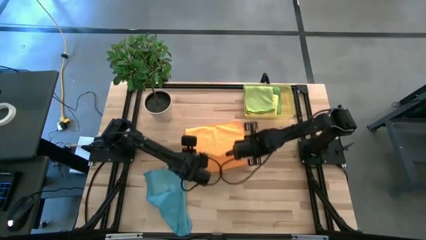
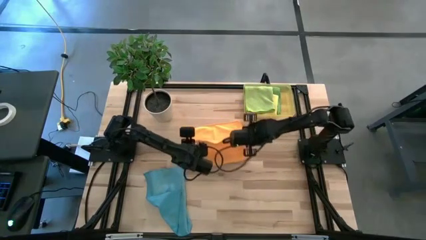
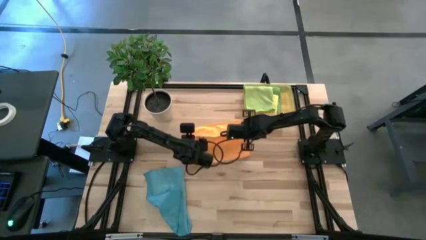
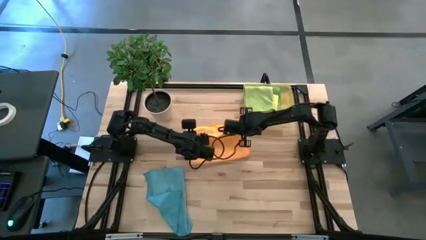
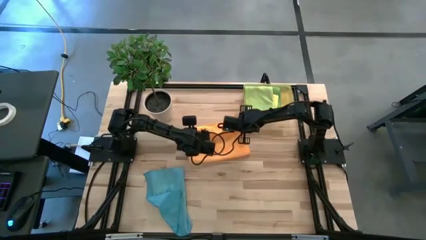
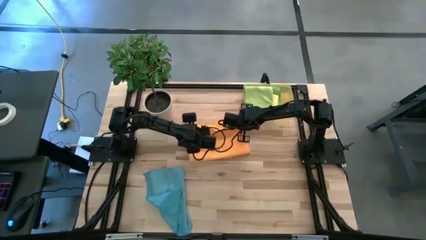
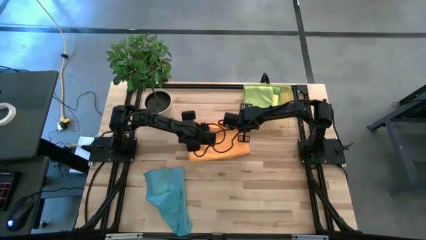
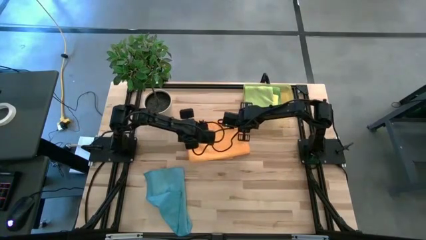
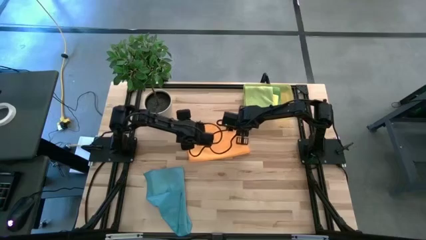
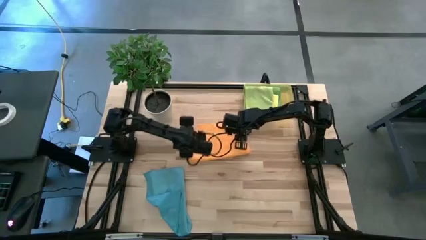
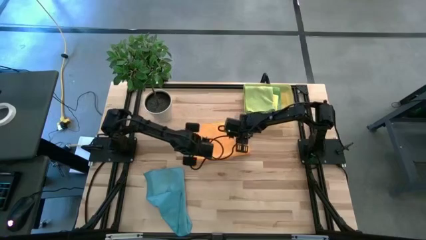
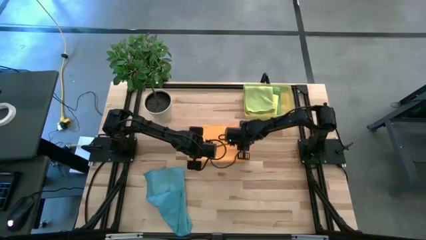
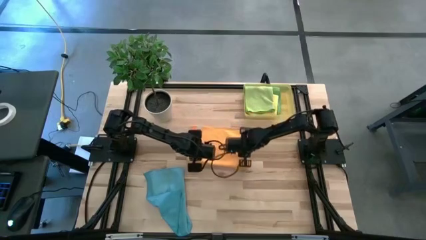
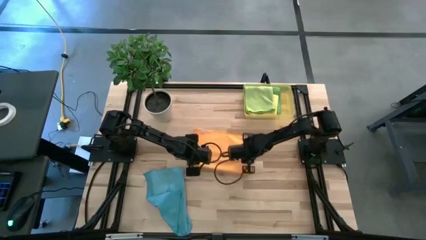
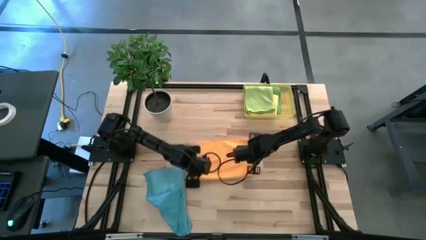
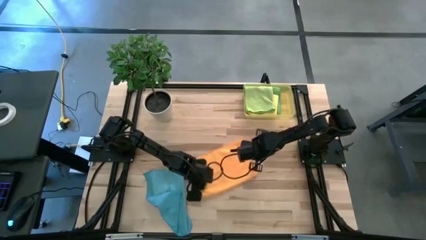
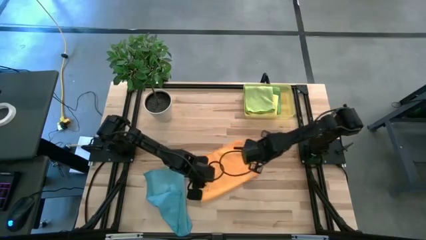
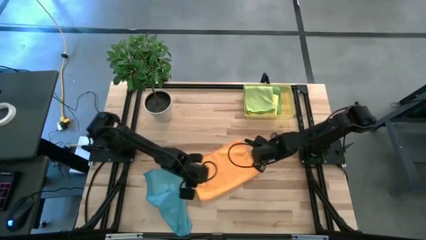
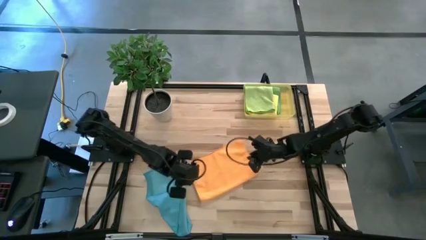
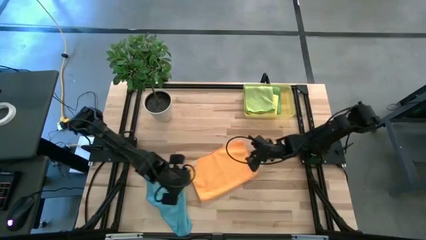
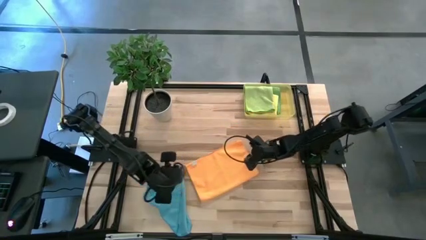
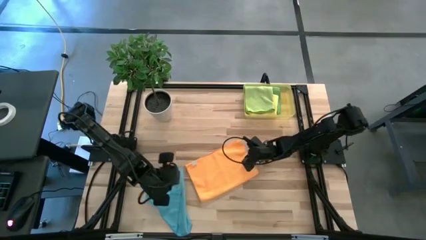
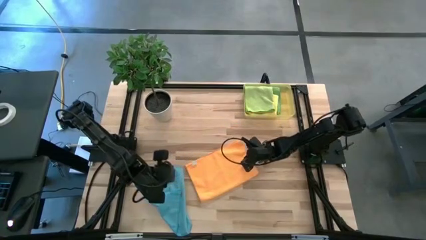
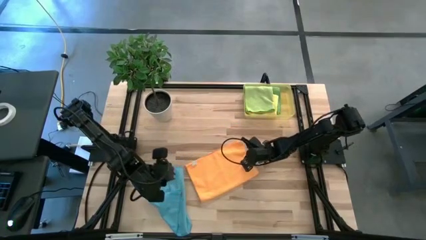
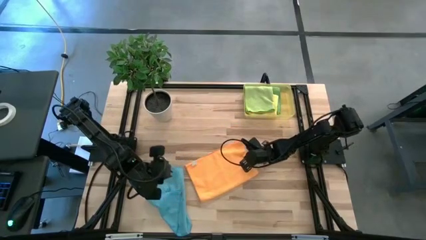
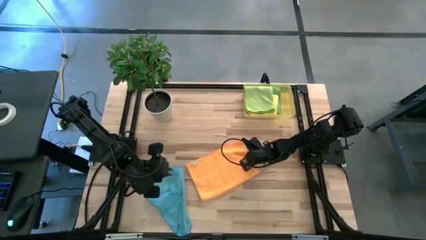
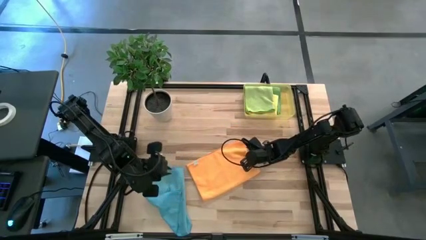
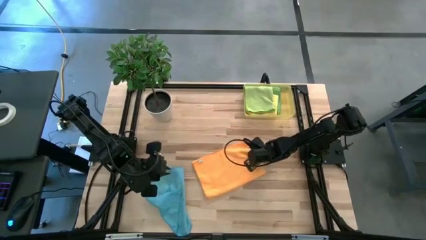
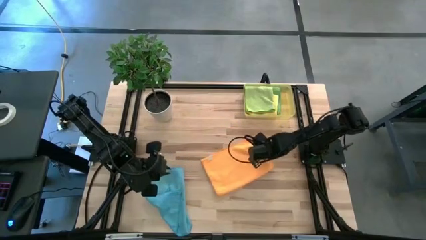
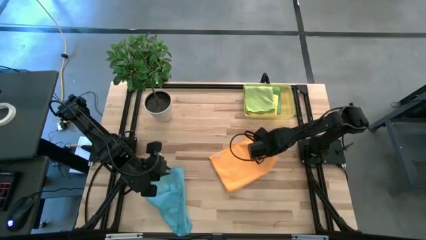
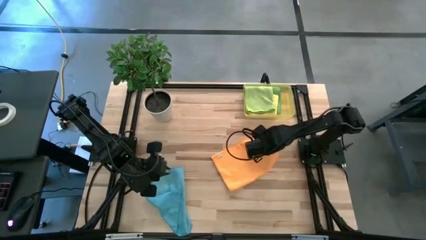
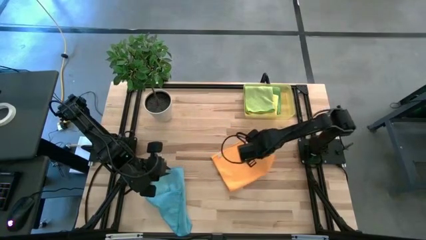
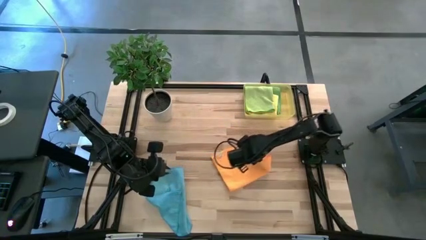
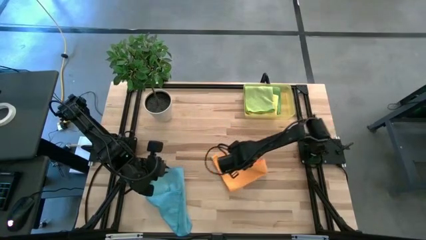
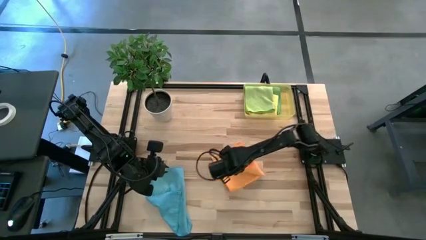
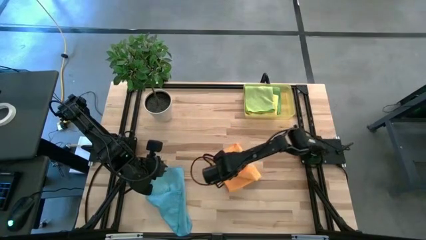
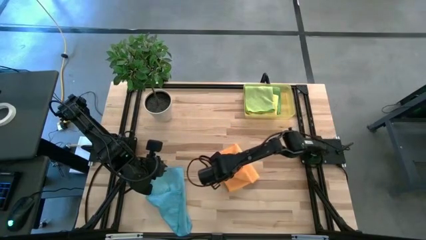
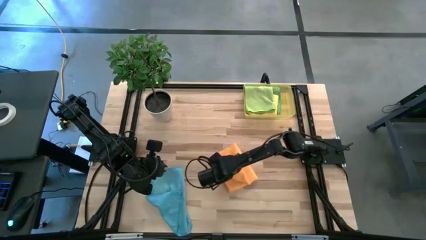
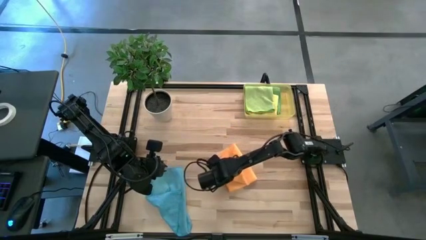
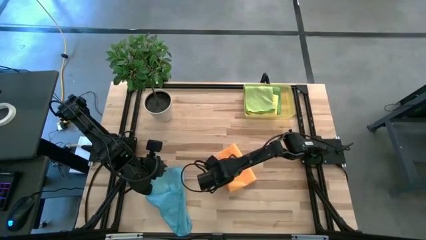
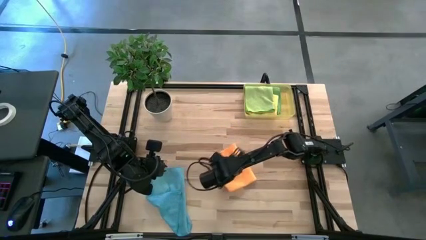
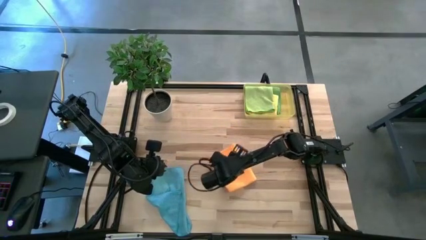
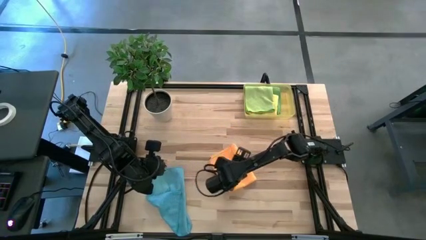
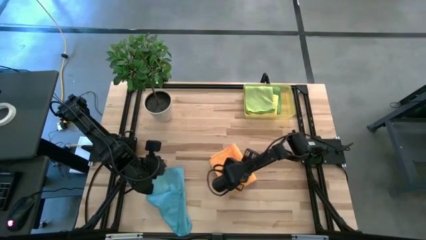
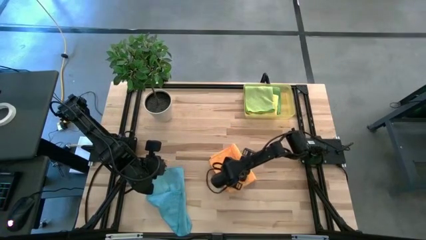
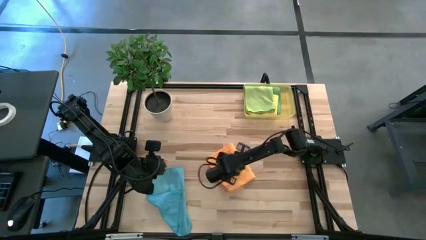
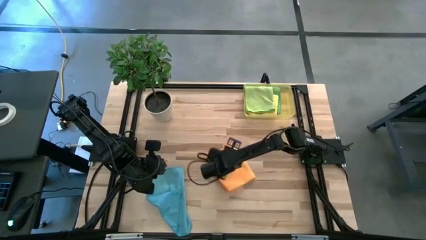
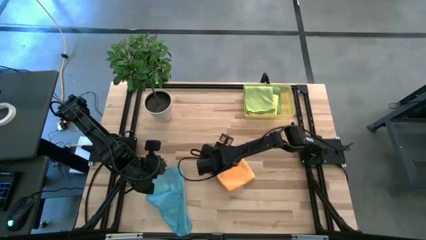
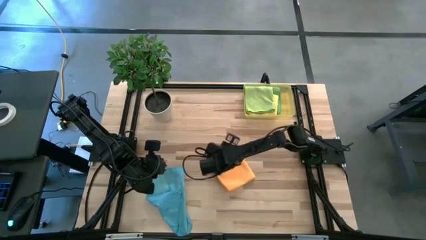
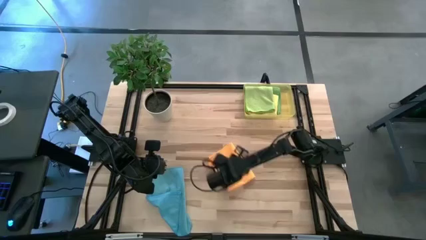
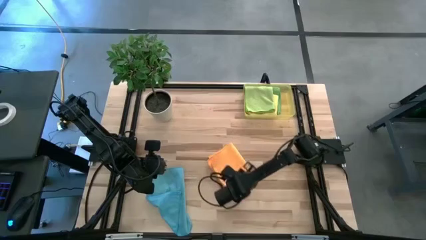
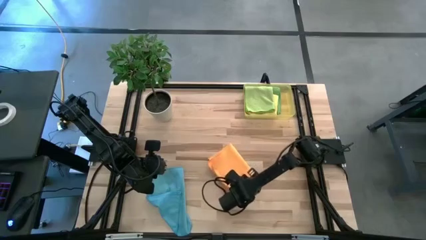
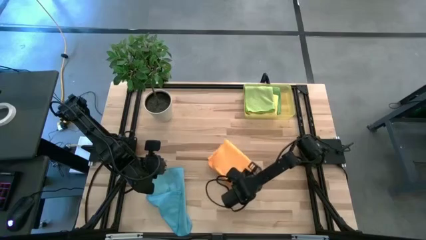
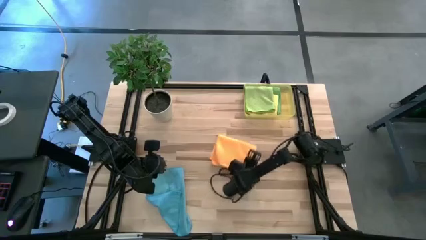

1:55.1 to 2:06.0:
Task: Fold microfiber towels
Fold the orange microfiber towel

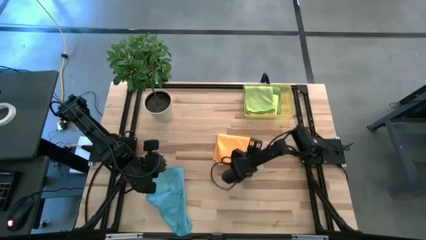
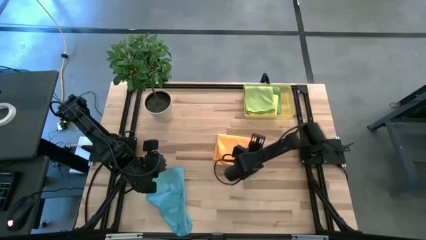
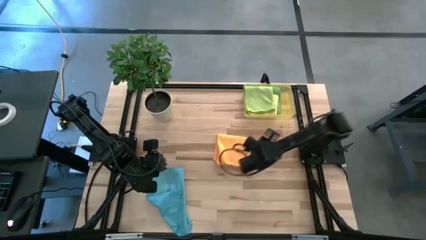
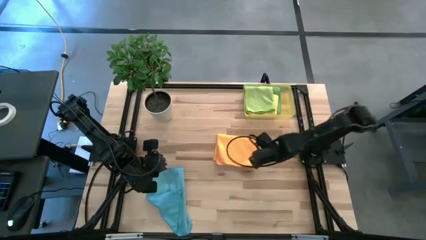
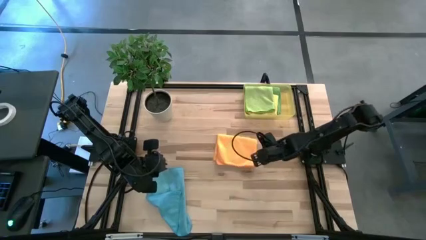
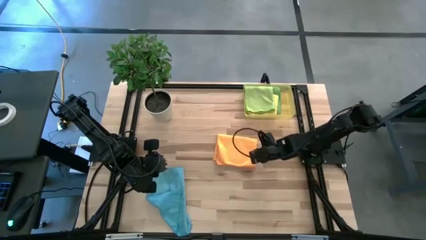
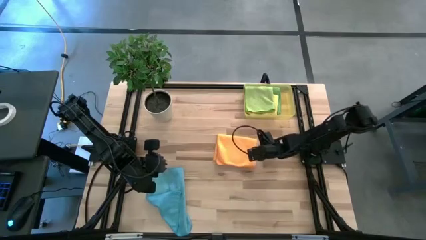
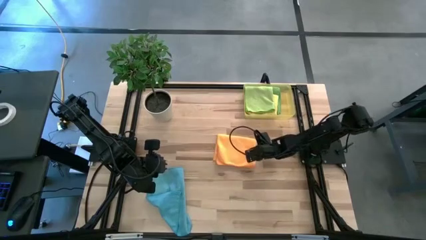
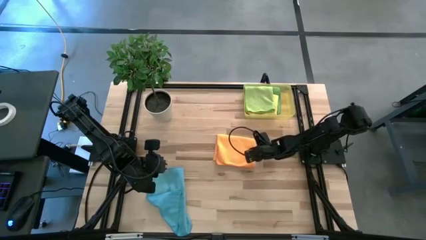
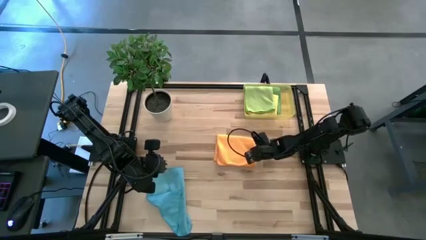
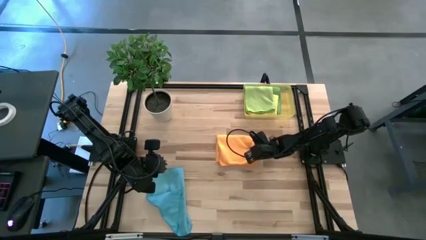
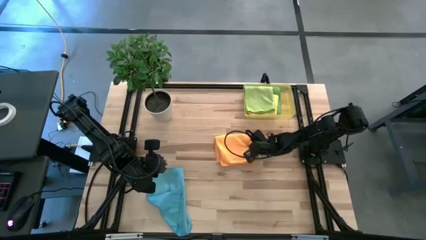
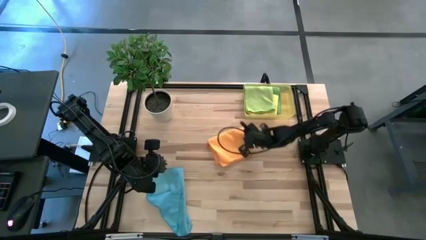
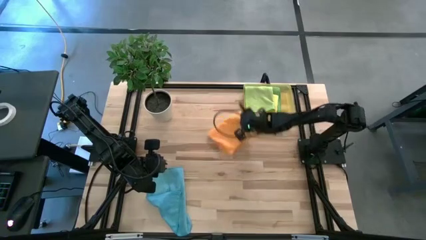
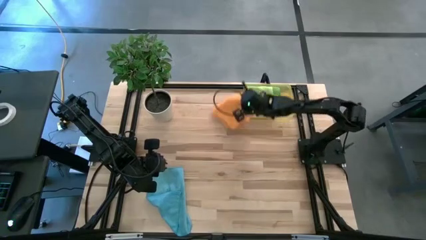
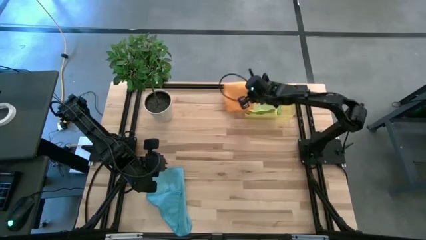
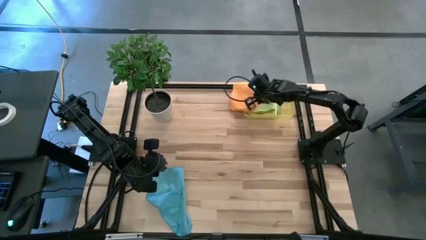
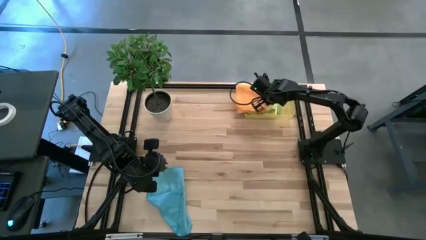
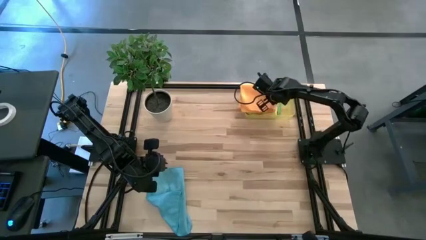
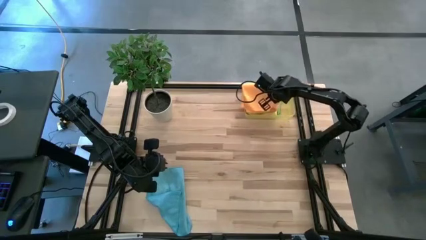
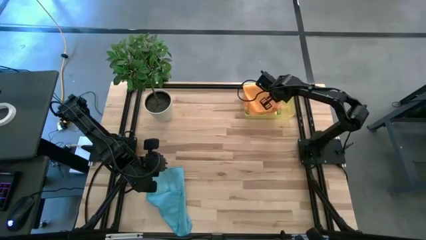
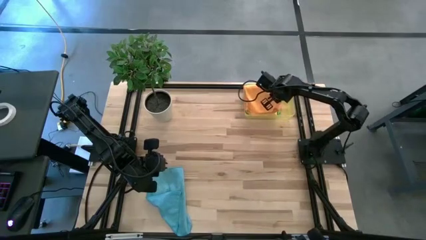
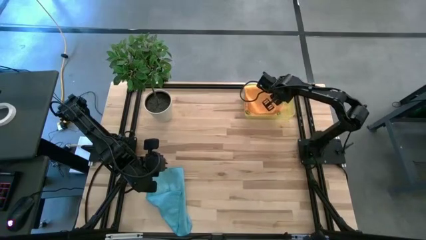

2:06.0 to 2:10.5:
Put the orange microfiber towel into the yellow bin
